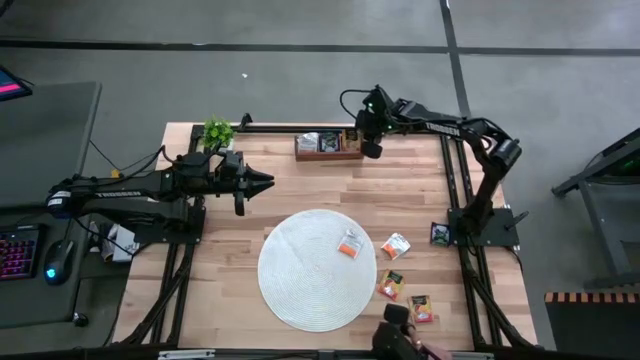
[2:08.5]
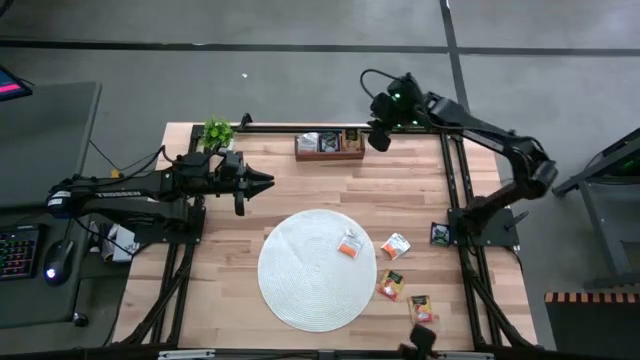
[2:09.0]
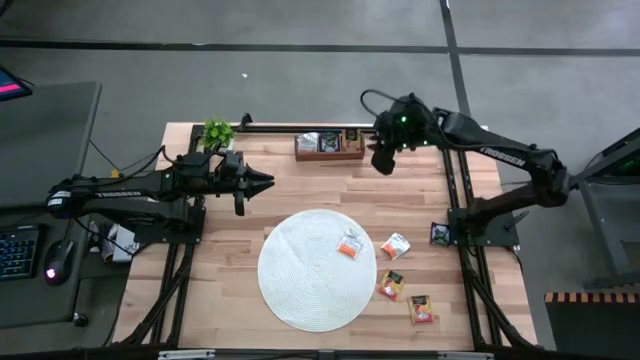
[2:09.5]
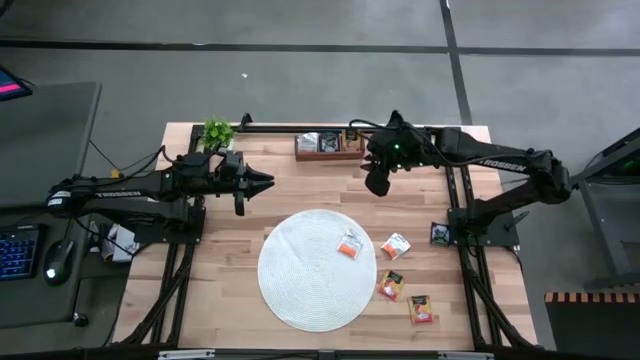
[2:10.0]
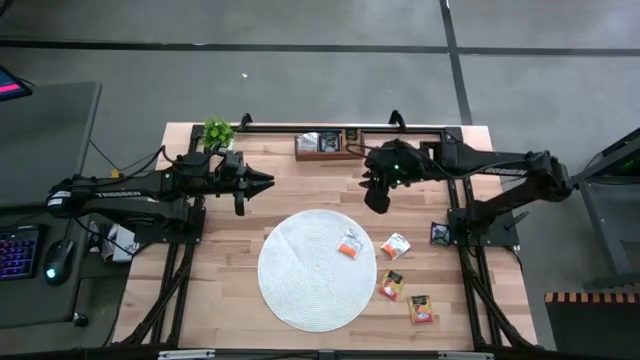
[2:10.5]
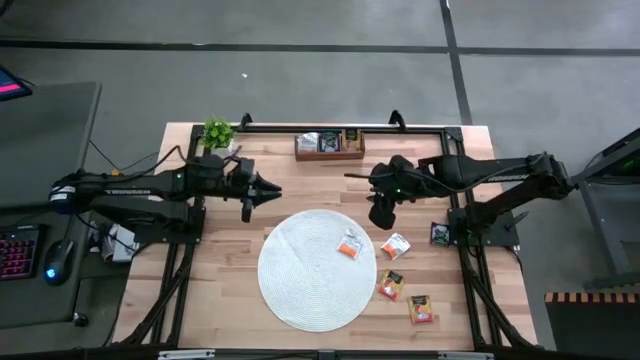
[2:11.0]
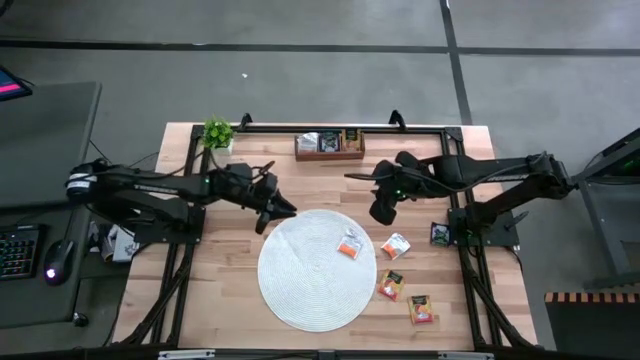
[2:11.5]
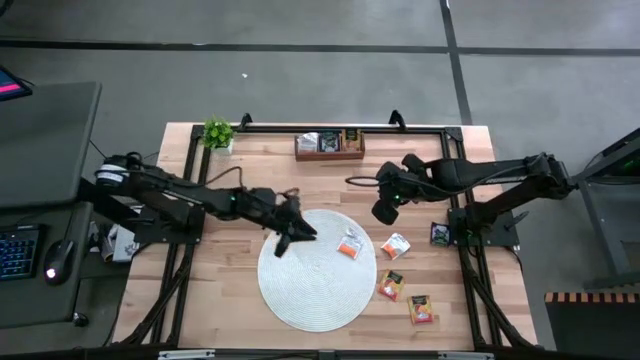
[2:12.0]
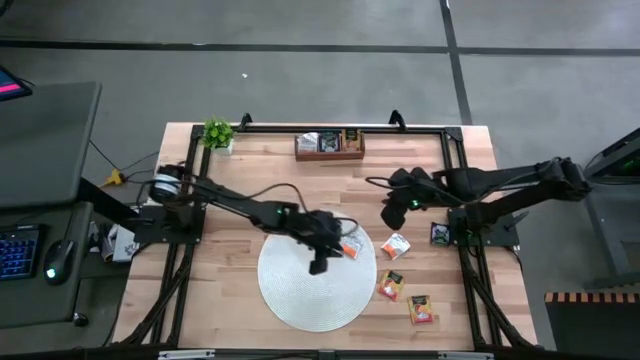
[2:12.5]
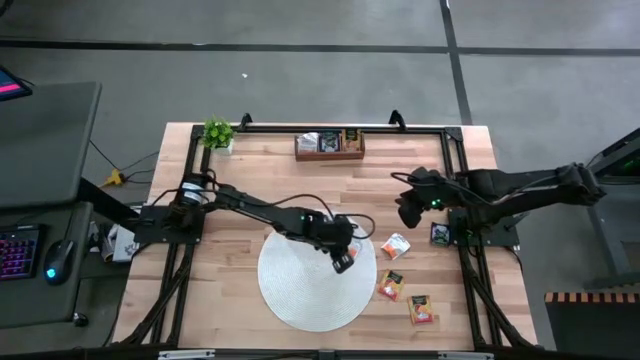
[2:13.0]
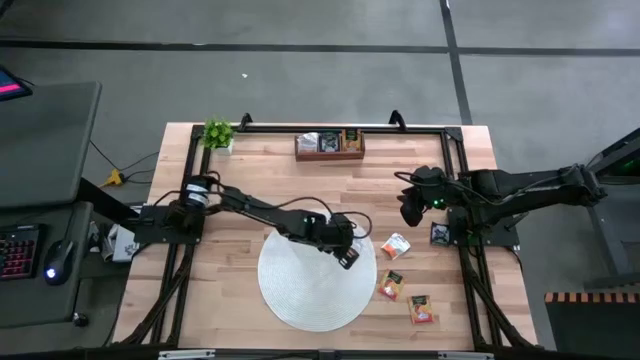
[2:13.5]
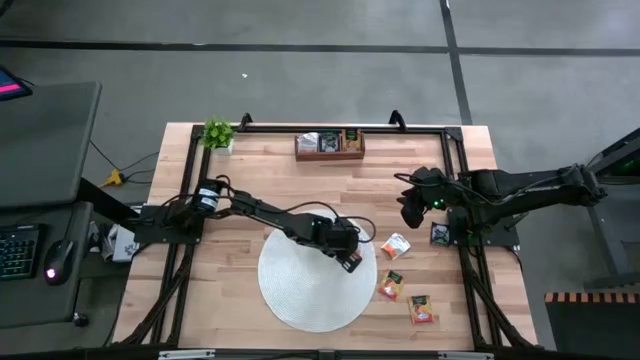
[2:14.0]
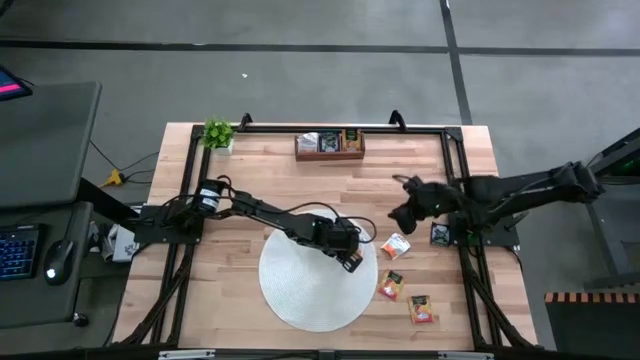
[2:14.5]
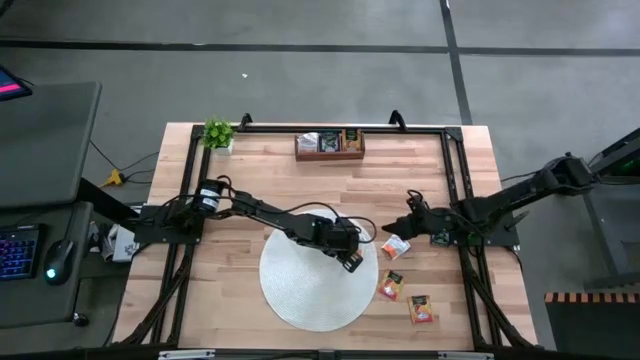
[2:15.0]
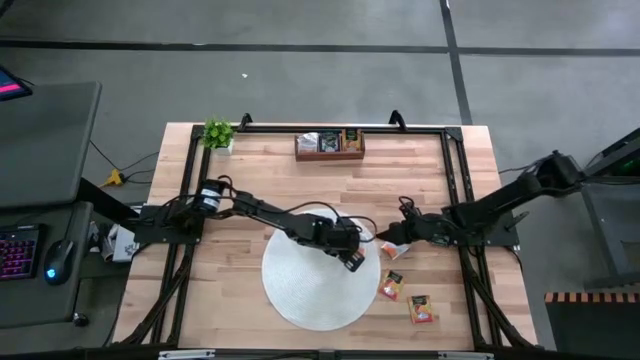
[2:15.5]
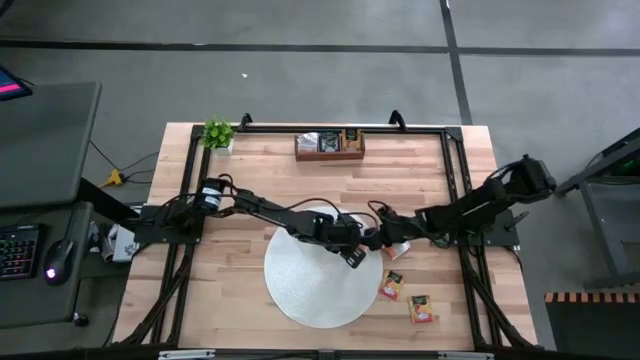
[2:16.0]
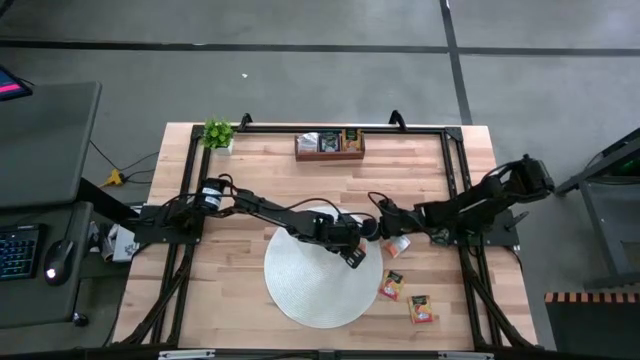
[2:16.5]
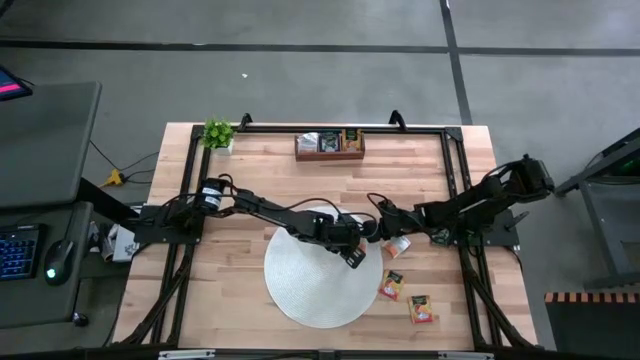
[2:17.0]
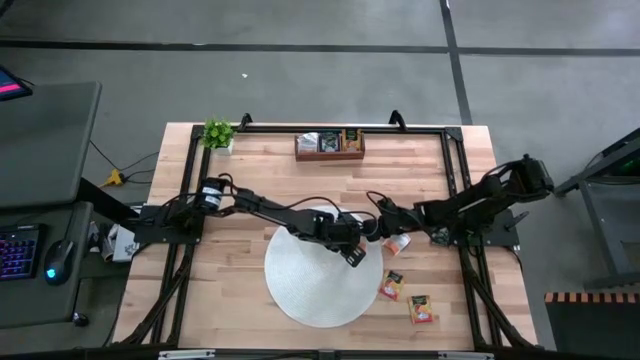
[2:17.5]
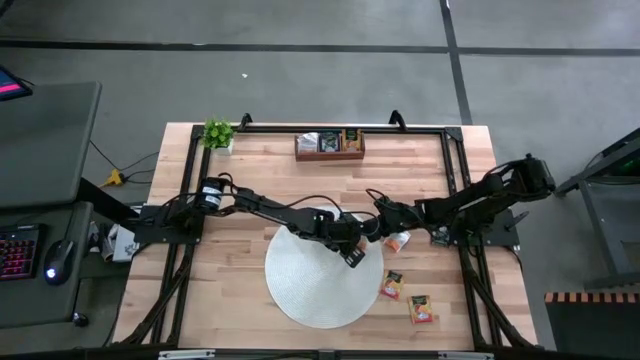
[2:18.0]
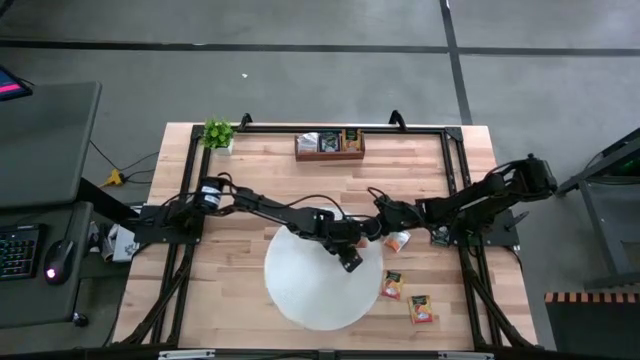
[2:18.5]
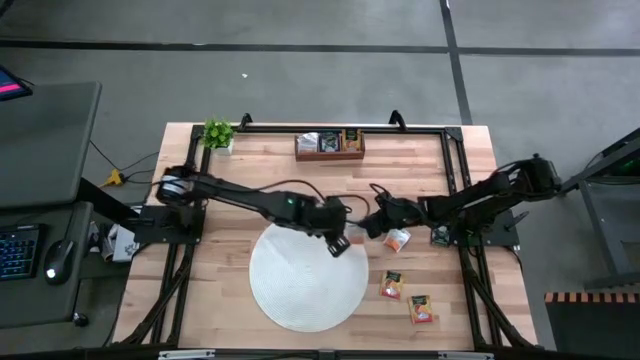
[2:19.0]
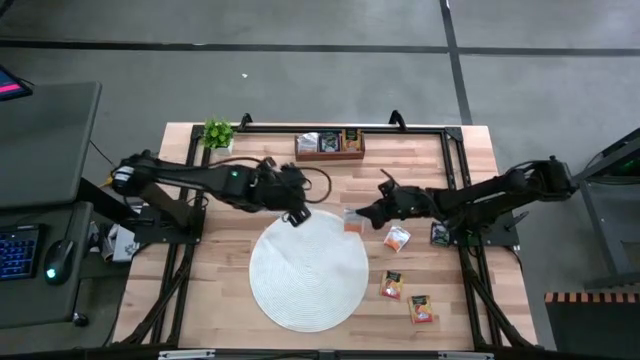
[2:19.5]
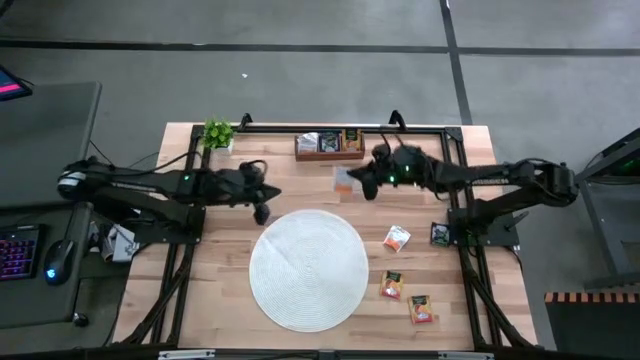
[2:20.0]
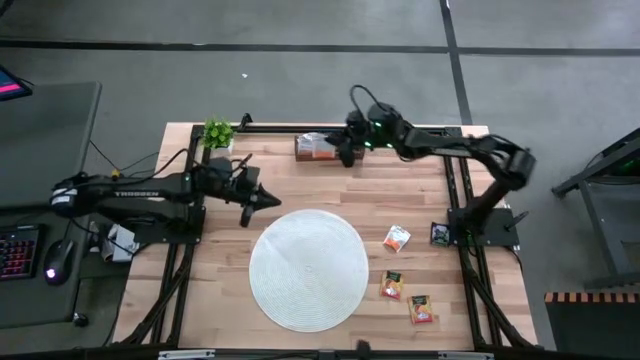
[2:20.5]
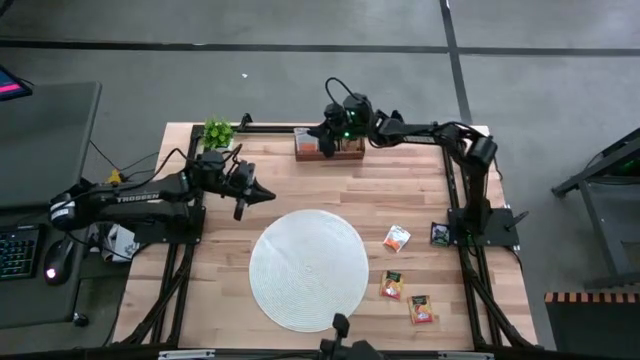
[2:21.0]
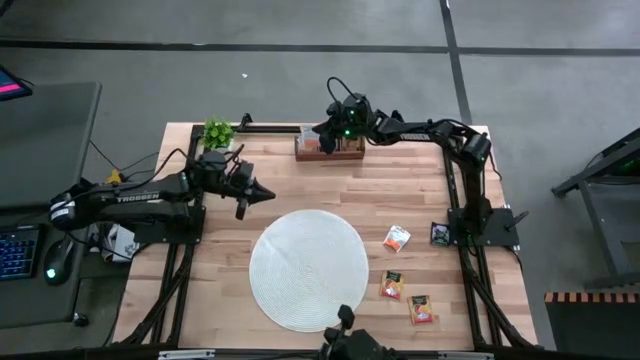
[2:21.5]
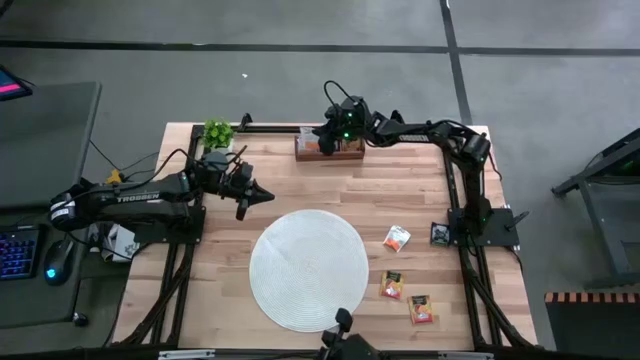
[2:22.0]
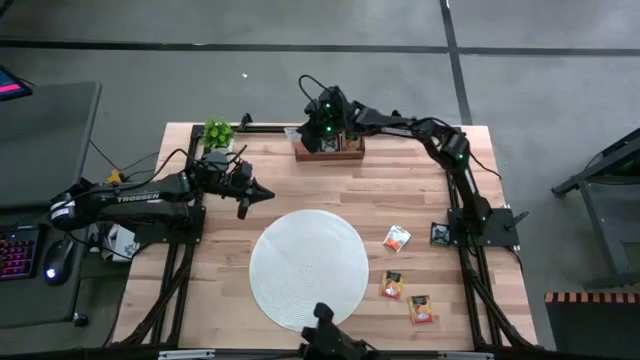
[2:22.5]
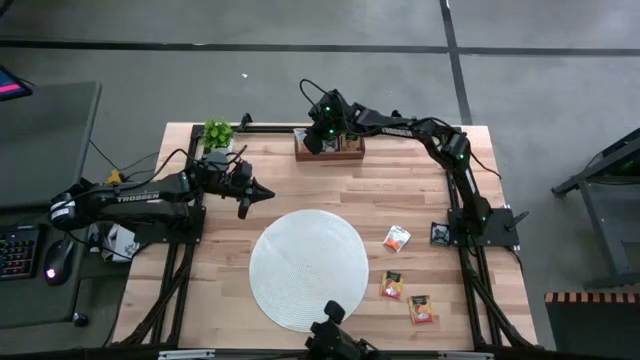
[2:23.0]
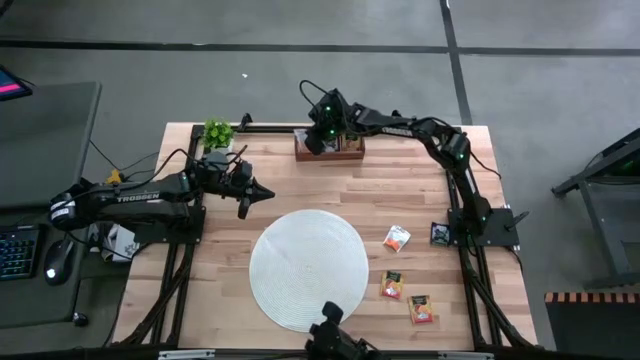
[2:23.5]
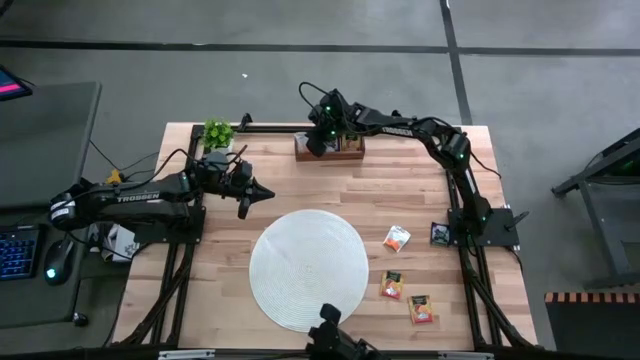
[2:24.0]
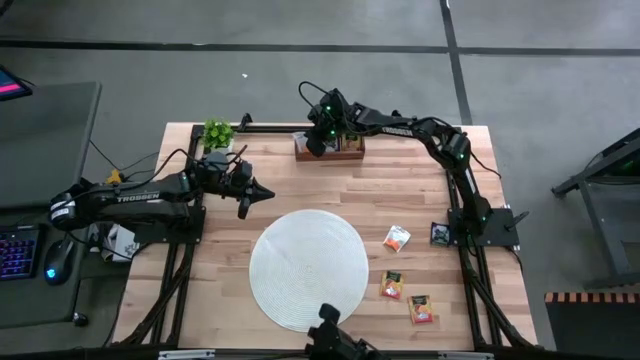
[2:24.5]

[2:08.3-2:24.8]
Task: Pick & Place Tea
Put the white tea bag into the left section of the wooden organizer

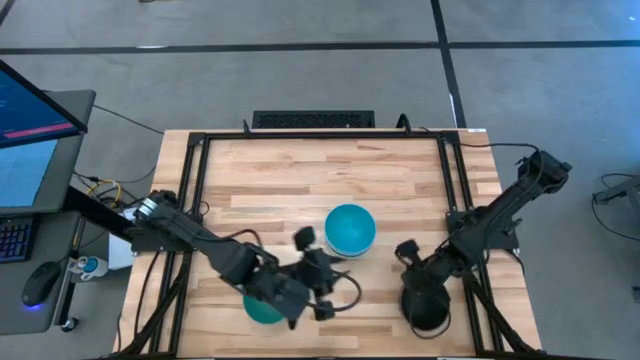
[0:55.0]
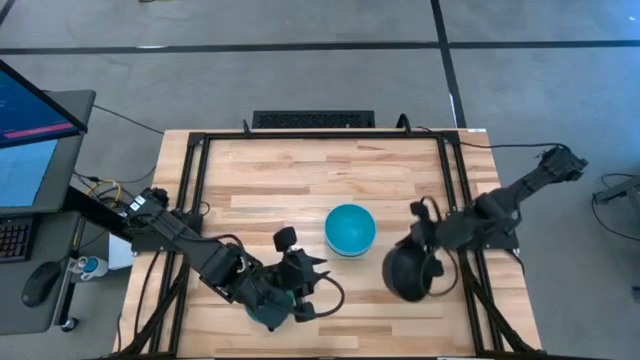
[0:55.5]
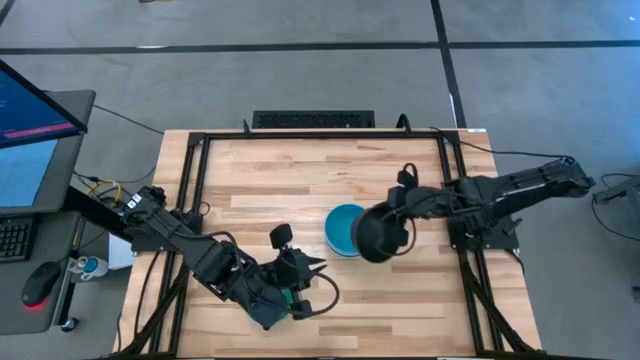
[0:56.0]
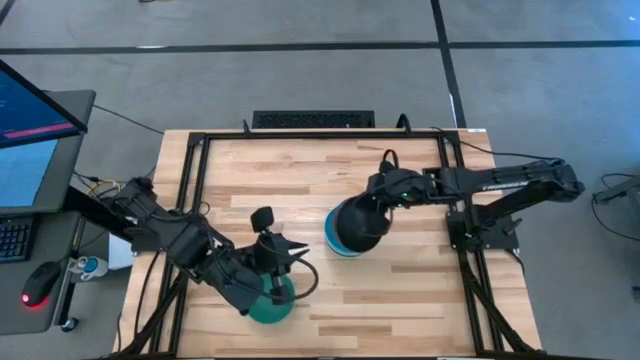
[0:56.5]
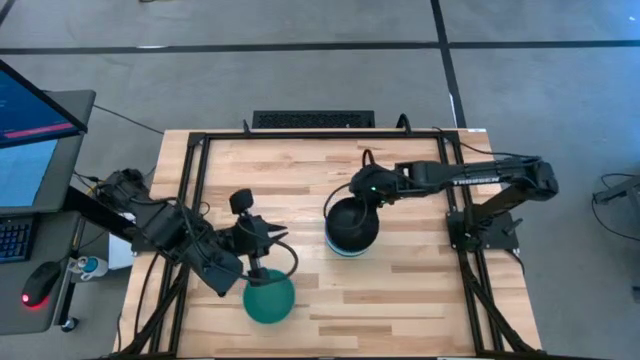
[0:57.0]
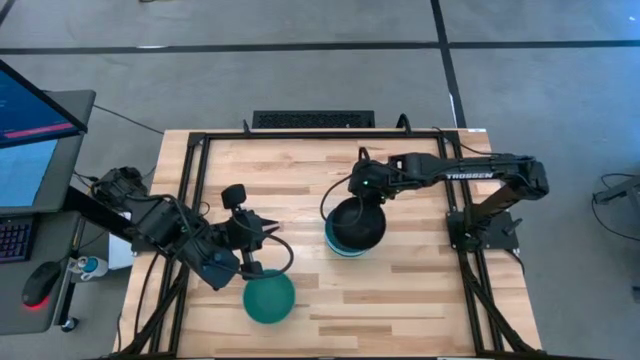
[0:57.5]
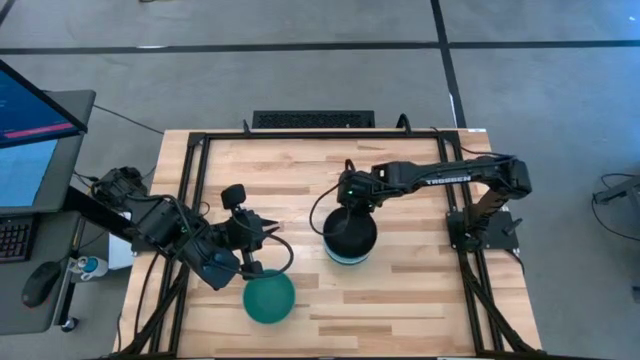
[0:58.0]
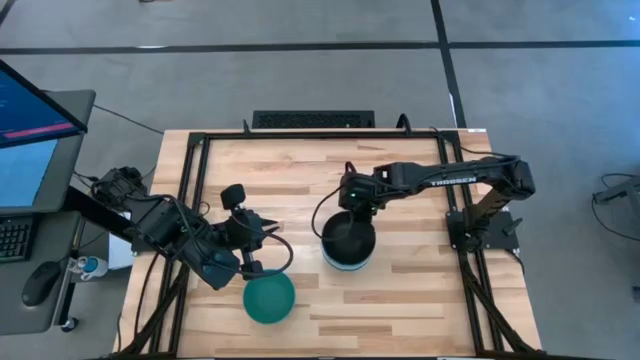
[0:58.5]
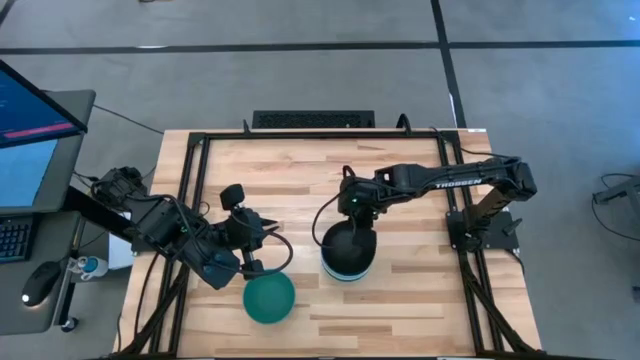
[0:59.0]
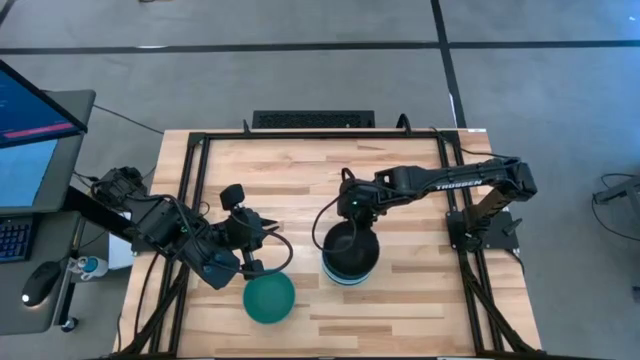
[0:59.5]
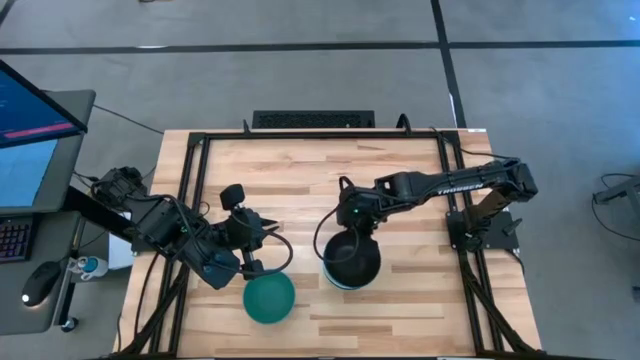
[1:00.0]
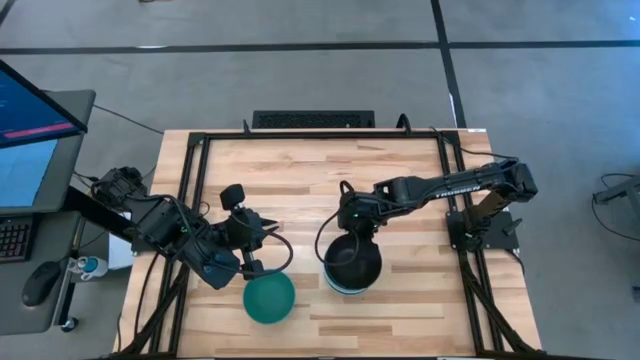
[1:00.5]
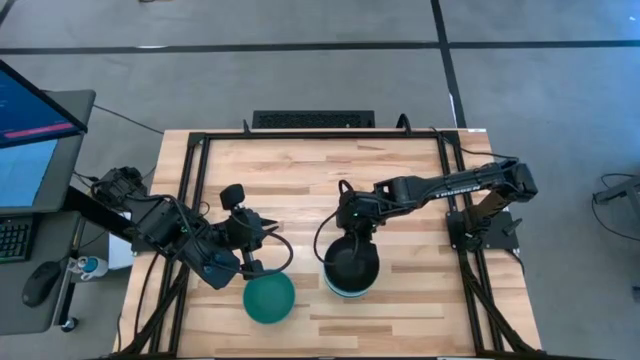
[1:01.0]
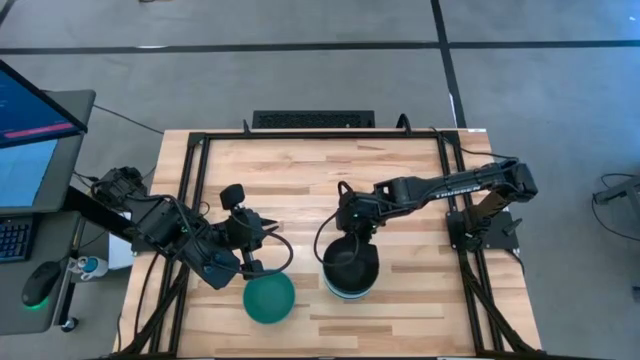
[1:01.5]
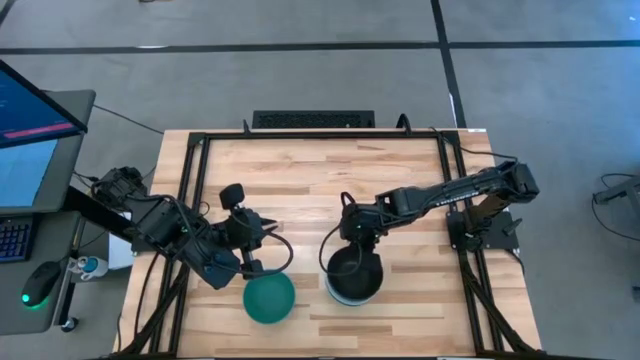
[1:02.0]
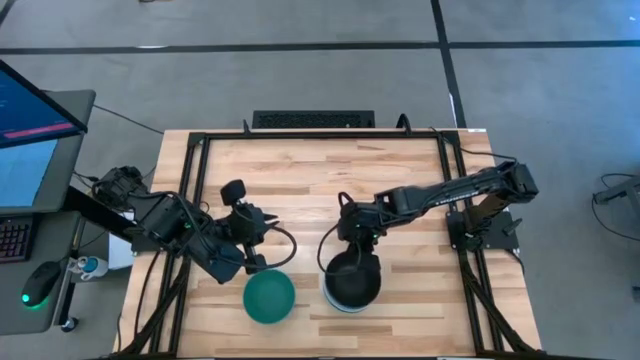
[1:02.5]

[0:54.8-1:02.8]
Task: Nest bowls inside each other
Stack the black bowl on the blue bowl
